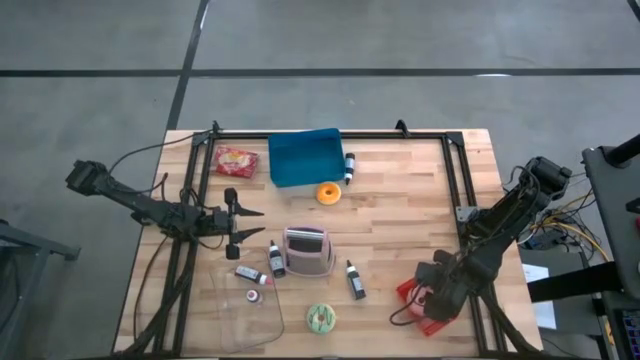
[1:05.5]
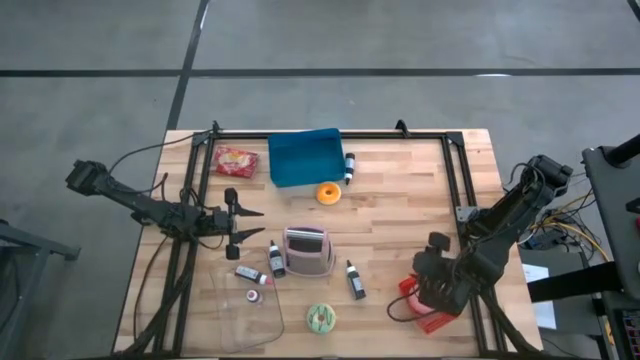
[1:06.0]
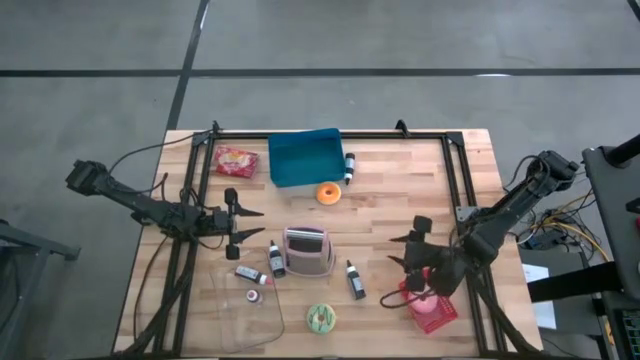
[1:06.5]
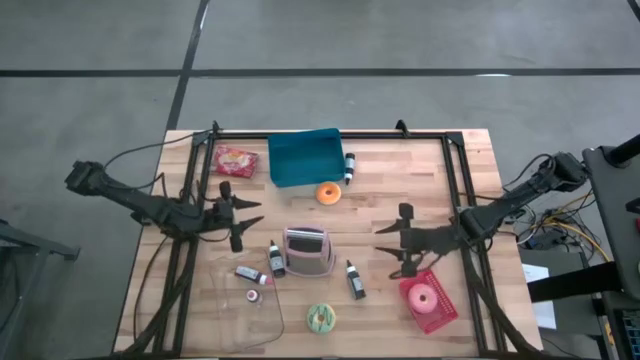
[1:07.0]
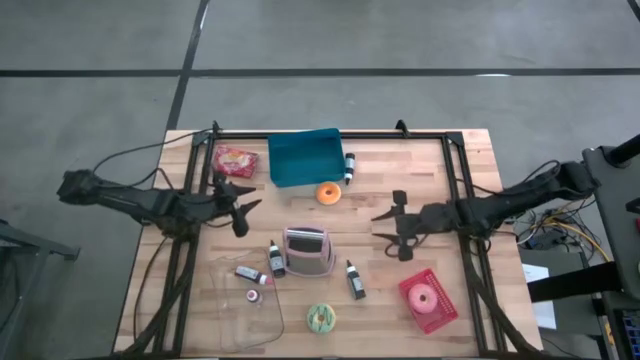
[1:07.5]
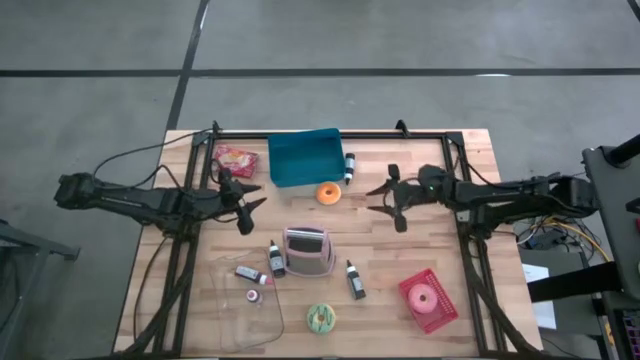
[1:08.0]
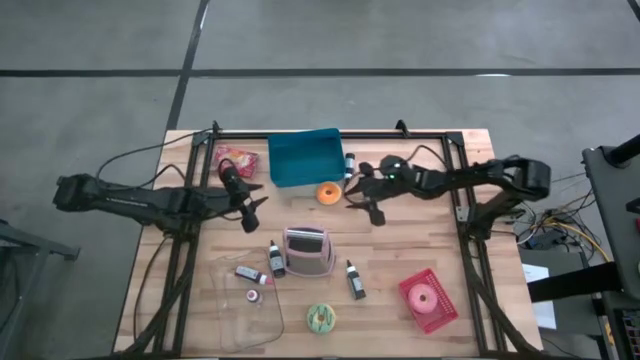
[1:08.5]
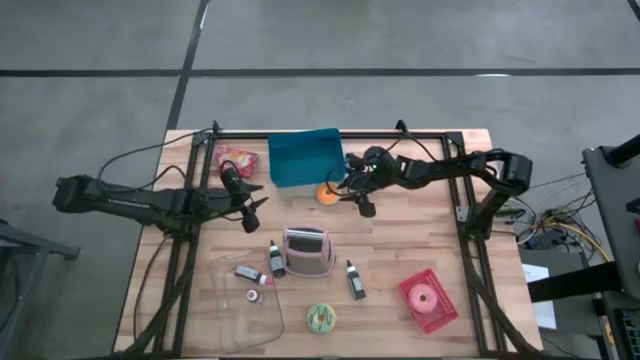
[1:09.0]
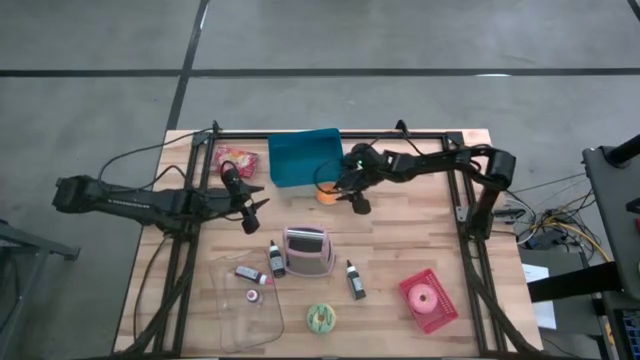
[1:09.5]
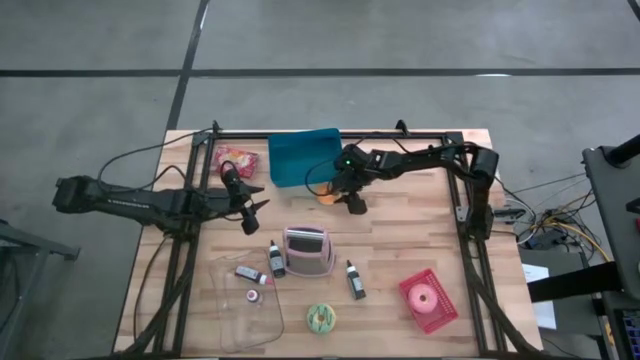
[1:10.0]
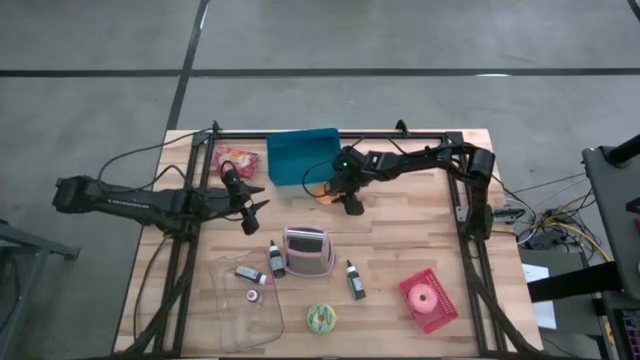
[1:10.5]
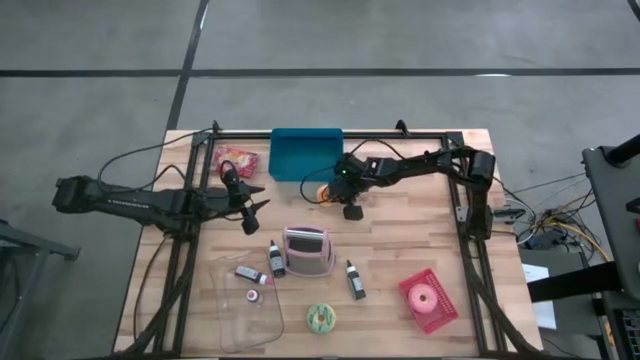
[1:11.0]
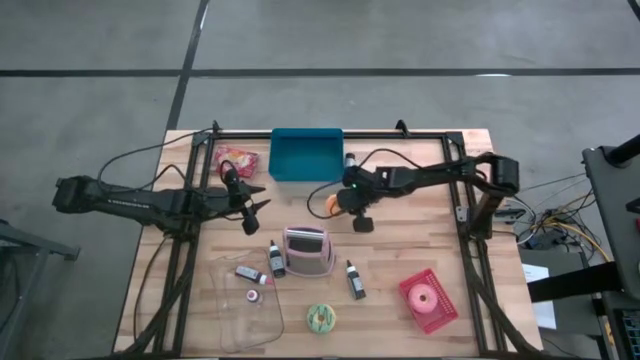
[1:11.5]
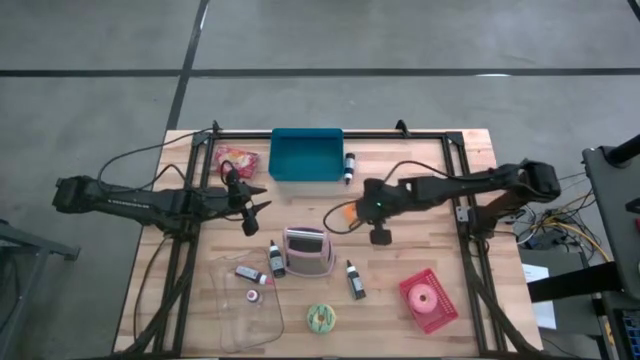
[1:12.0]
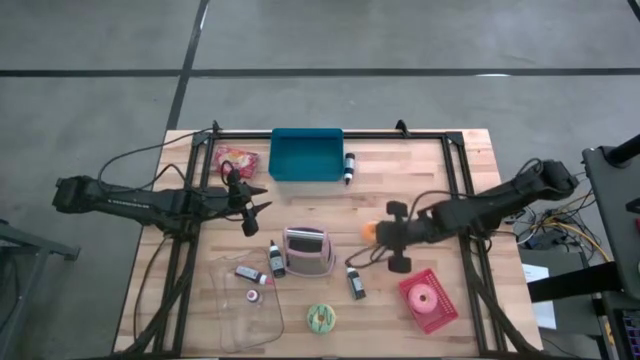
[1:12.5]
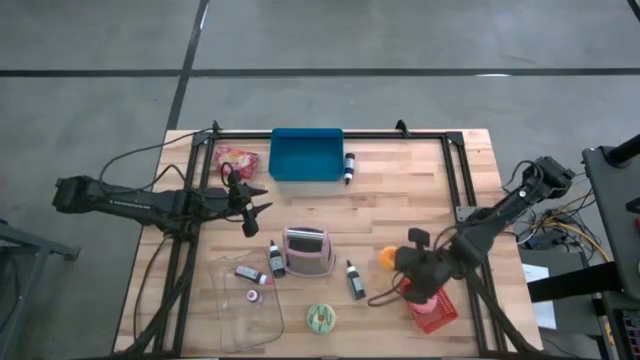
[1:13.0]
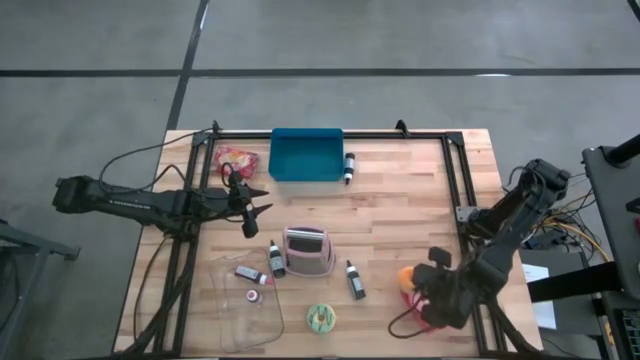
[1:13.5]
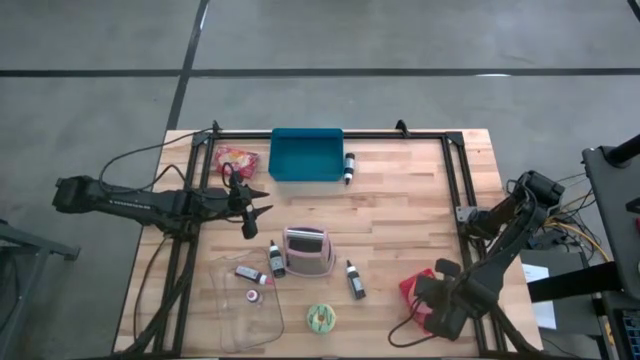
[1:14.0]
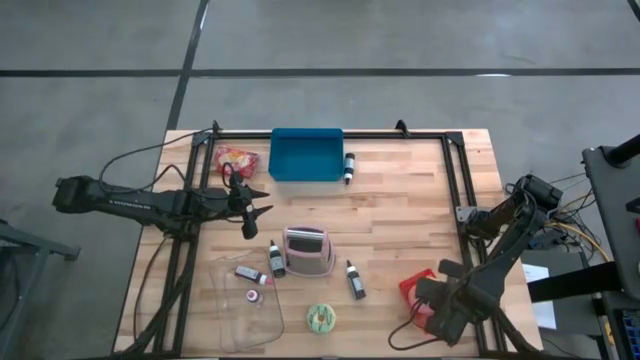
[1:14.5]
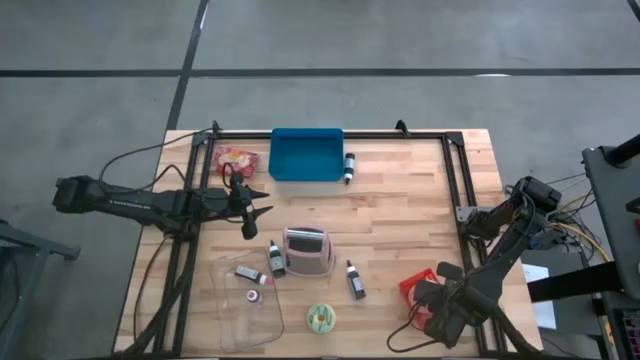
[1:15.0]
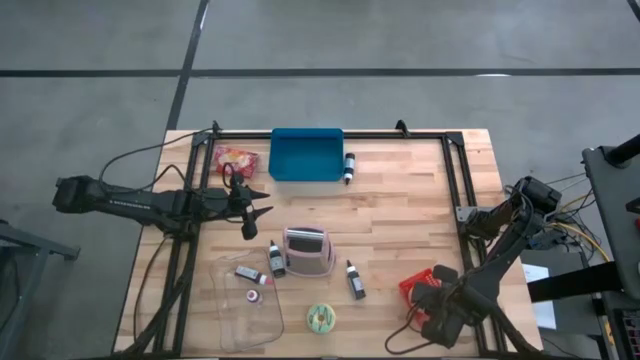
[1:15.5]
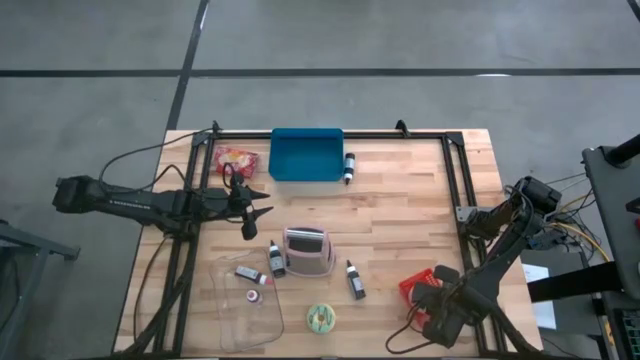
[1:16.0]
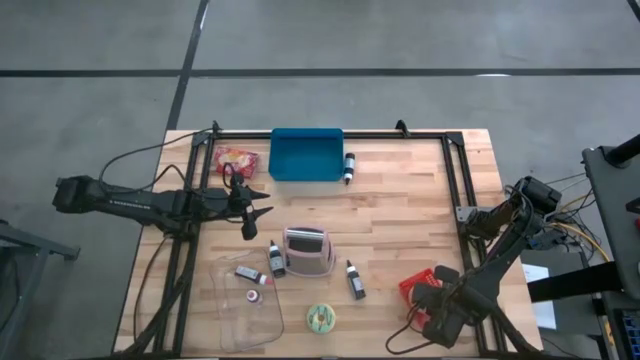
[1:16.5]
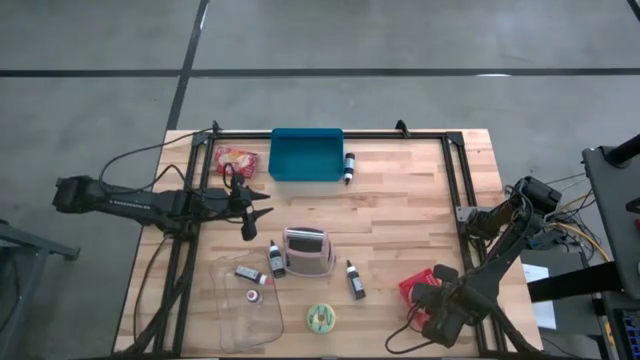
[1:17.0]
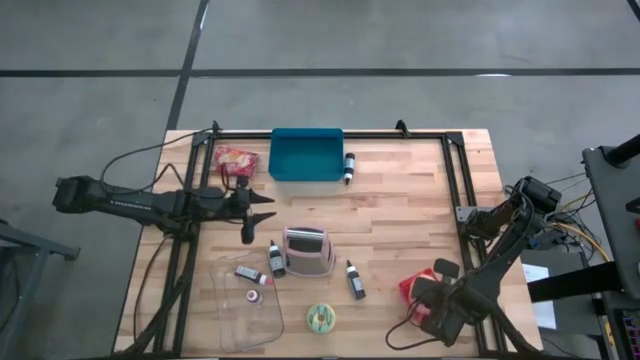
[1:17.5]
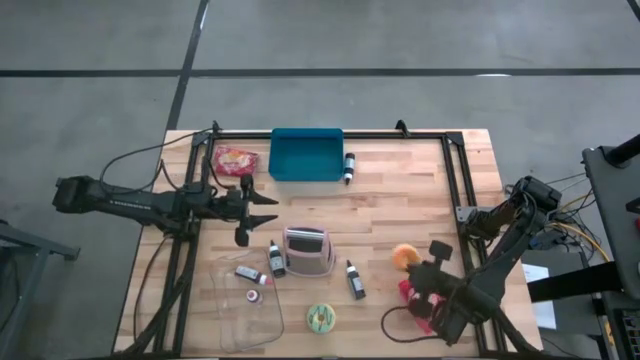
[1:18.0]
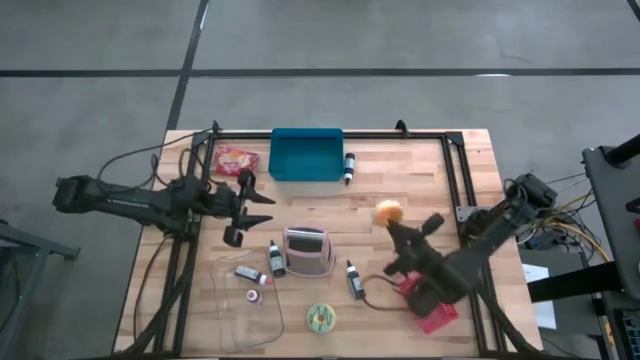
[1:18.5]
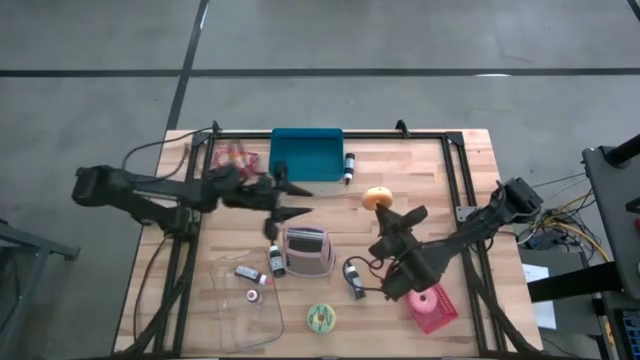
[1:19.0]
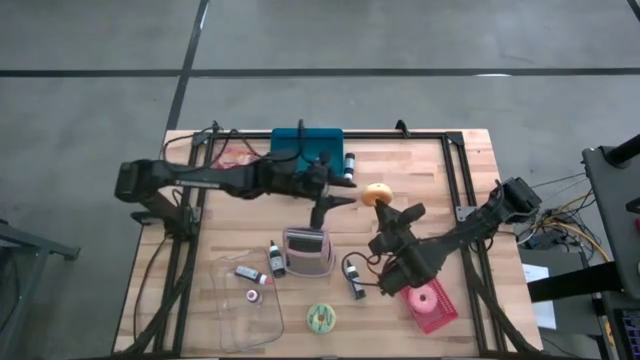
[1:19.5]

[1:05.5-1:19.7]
Task: Pick & Place Food Item
Put the black donut into the red bin

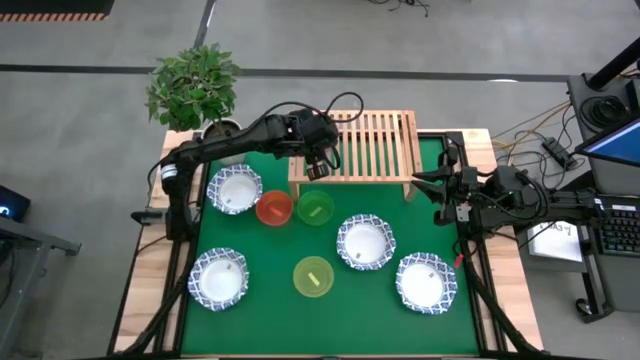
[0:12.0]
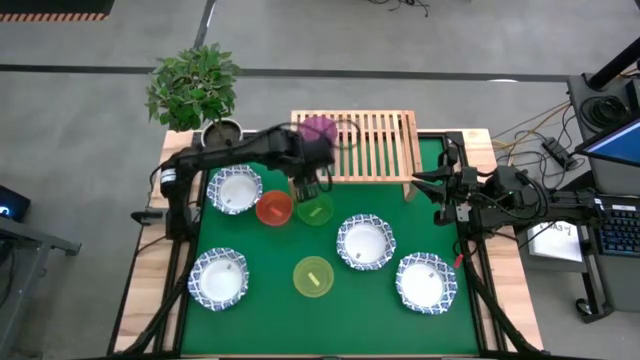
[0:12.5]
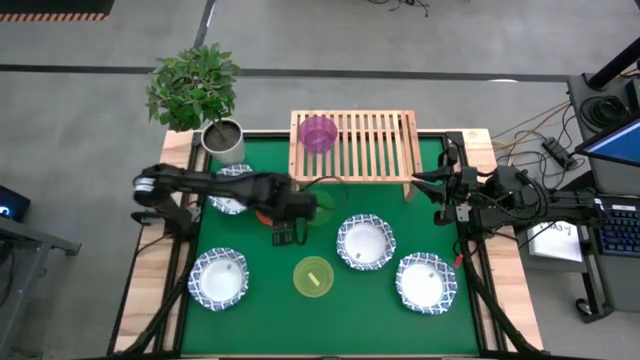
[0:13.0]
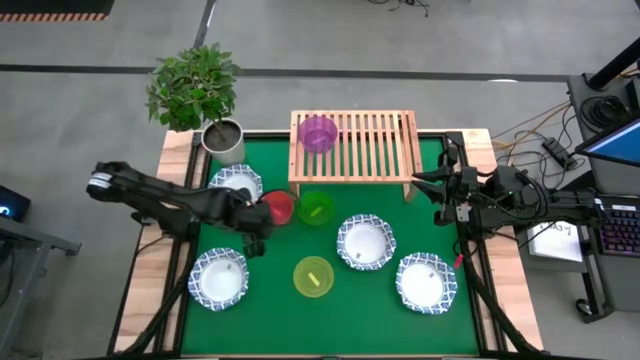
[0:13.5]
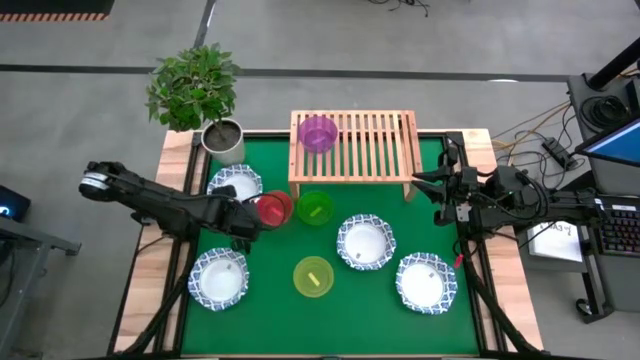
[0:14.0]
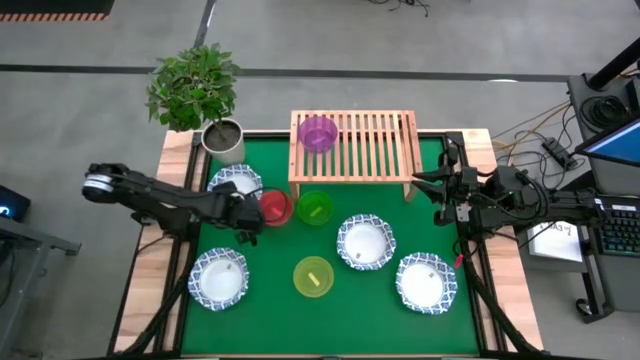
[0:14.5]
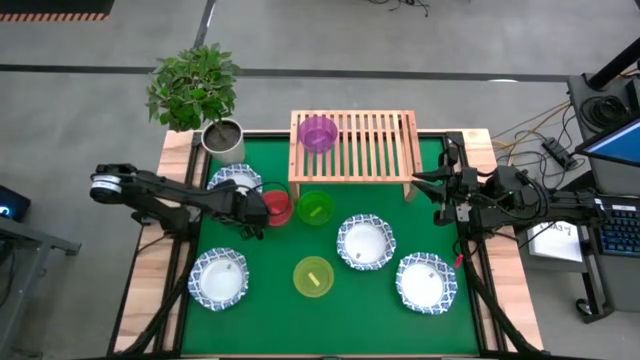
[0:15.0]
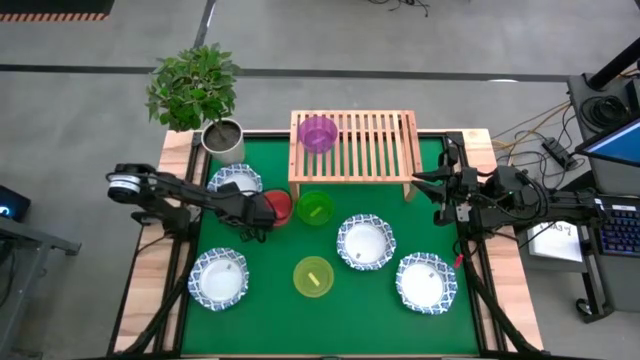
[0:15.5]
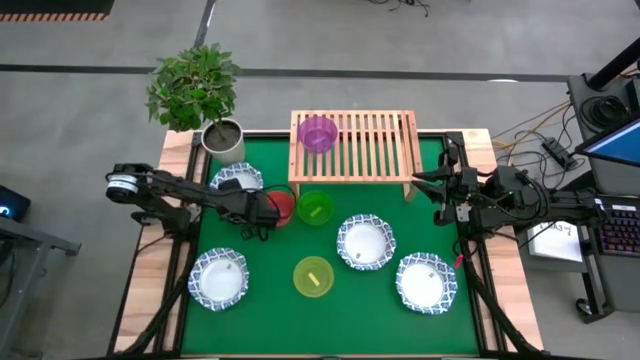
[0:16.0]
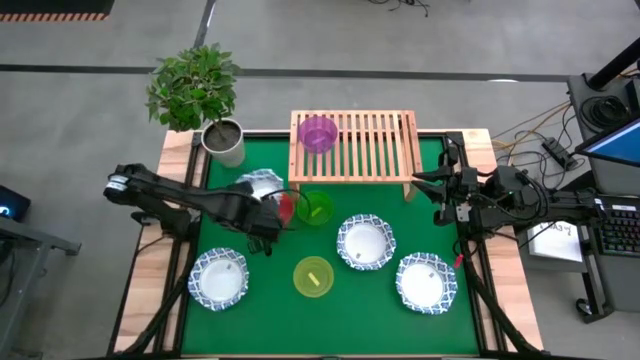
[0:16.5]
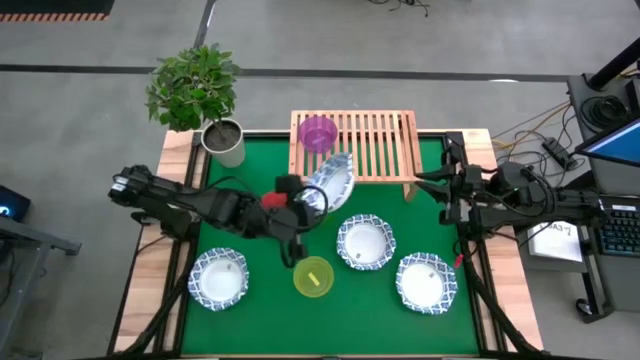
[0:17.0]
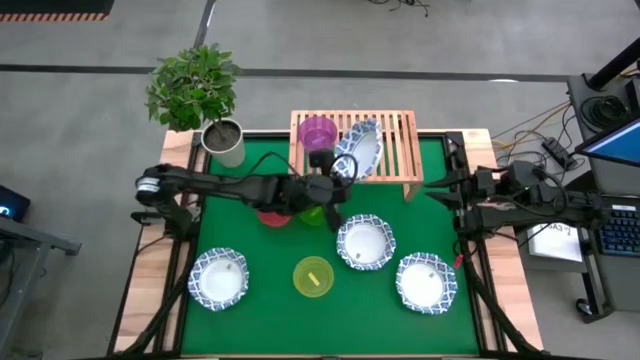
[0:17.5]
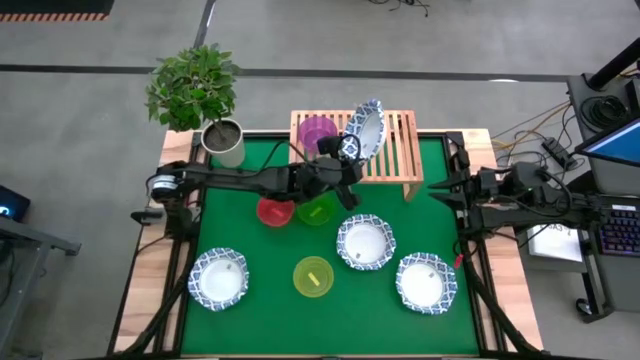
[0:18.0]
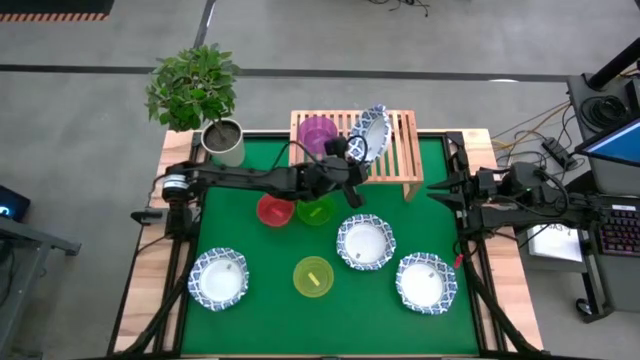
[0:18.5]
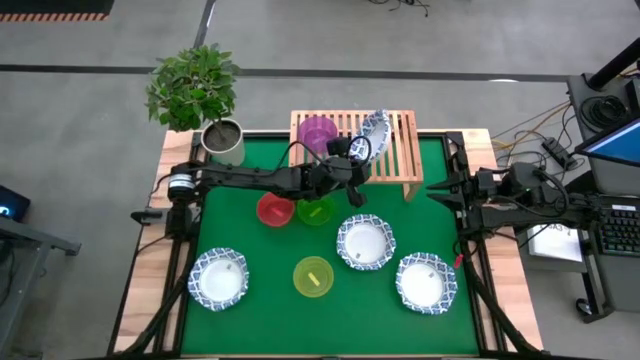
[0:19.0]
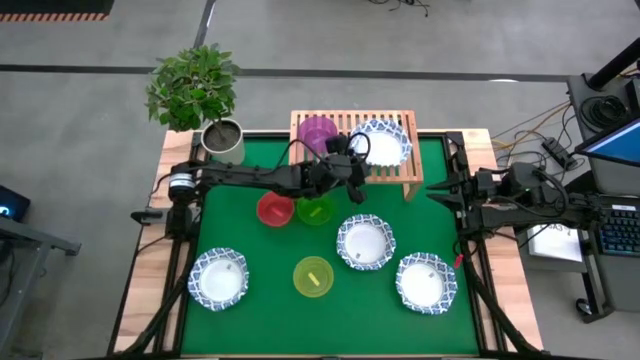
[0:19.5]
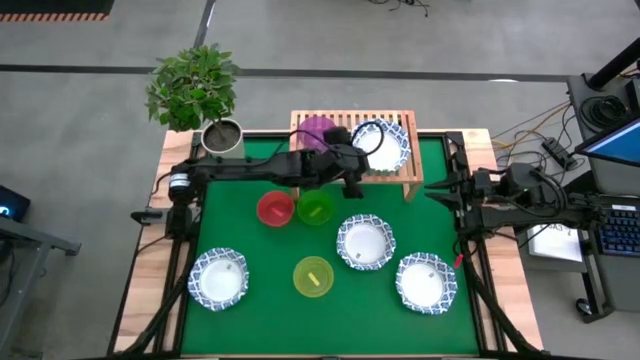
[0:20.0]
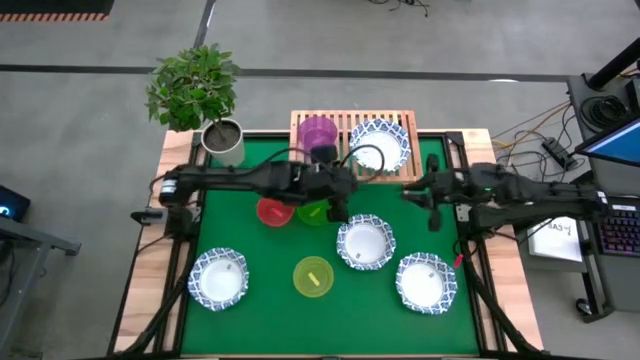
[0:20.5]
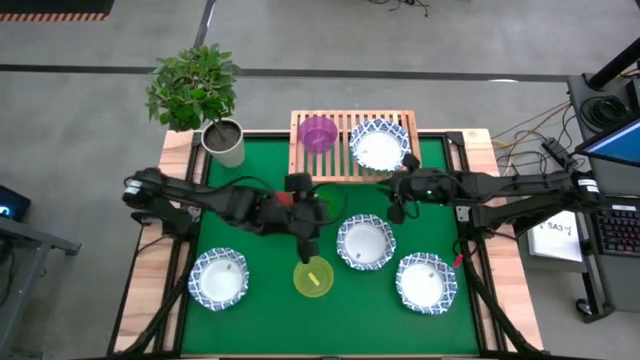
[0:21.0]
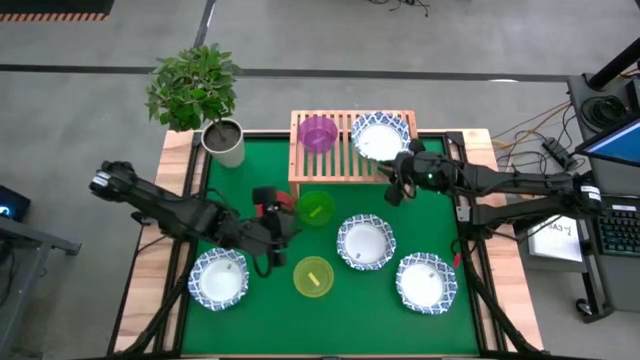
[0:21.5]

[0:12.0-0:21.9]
Task: Place and stack bowls onto a shelf
Put the top left white patterned bowl on the shelf
